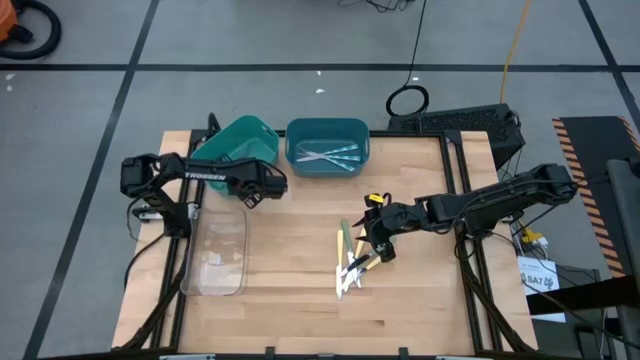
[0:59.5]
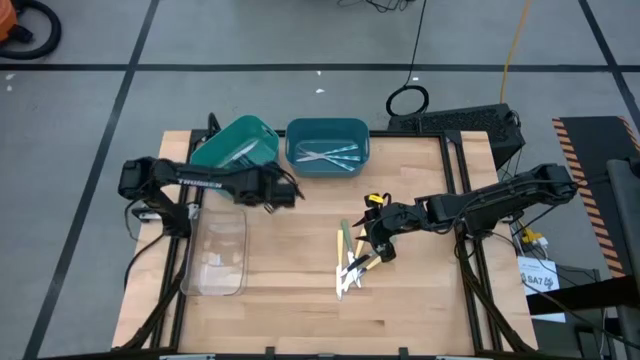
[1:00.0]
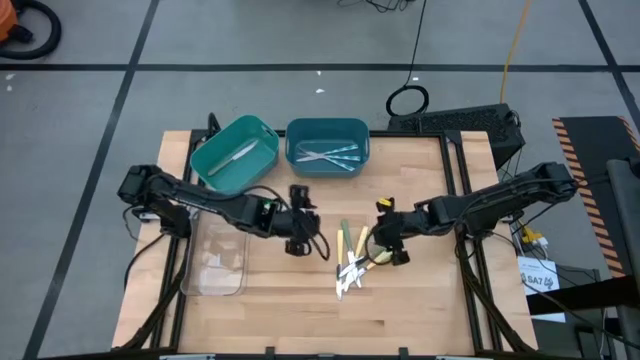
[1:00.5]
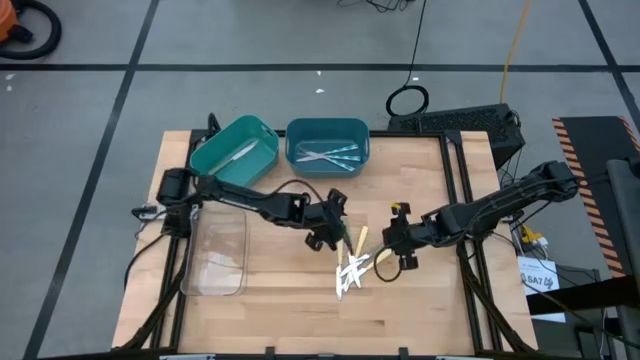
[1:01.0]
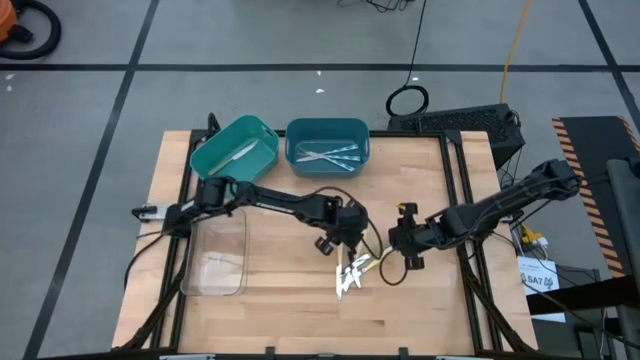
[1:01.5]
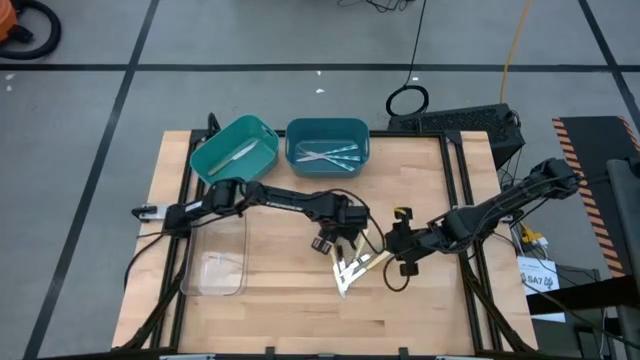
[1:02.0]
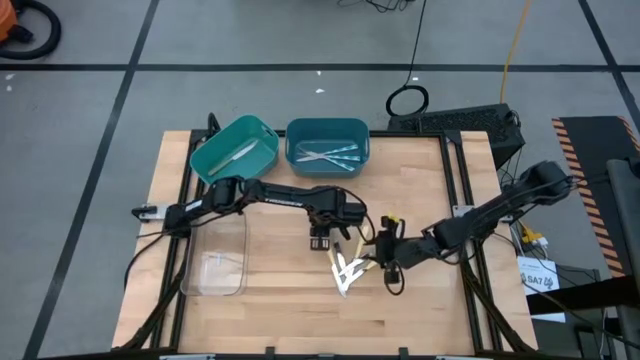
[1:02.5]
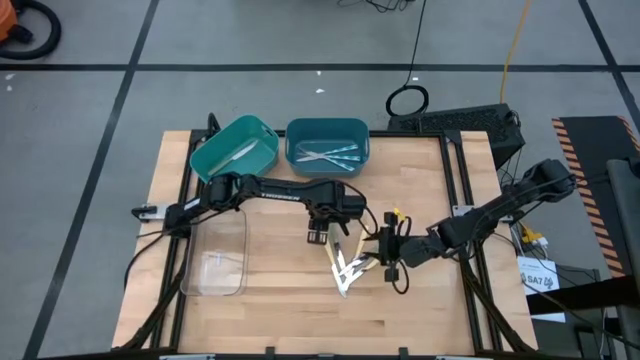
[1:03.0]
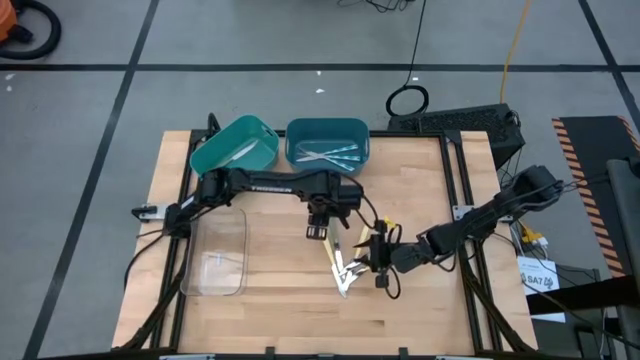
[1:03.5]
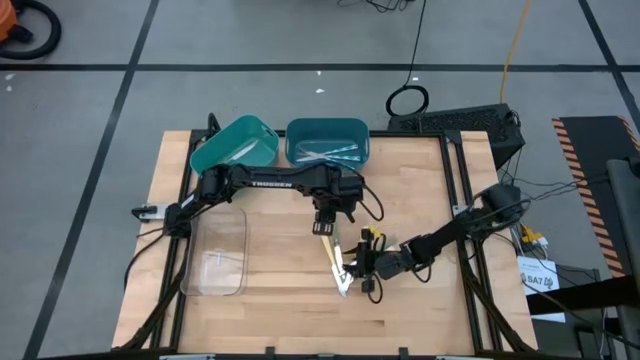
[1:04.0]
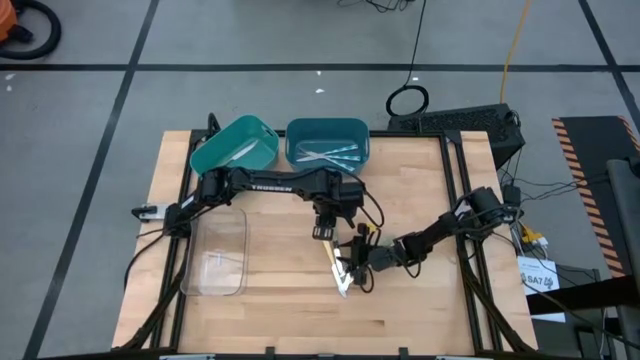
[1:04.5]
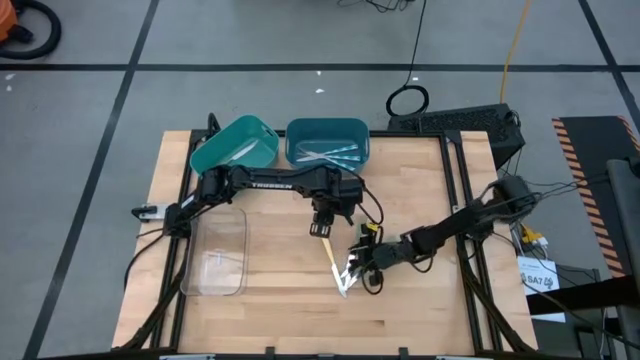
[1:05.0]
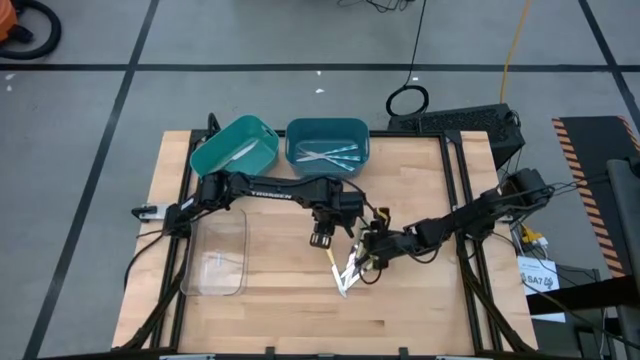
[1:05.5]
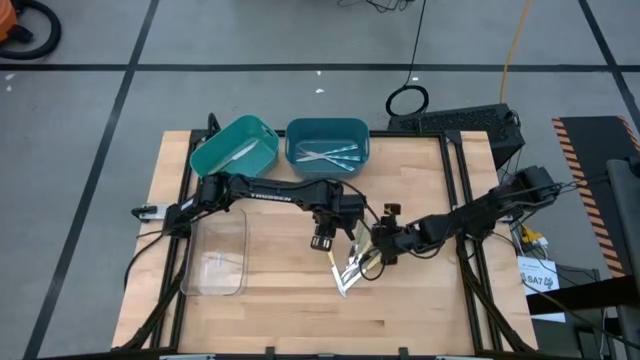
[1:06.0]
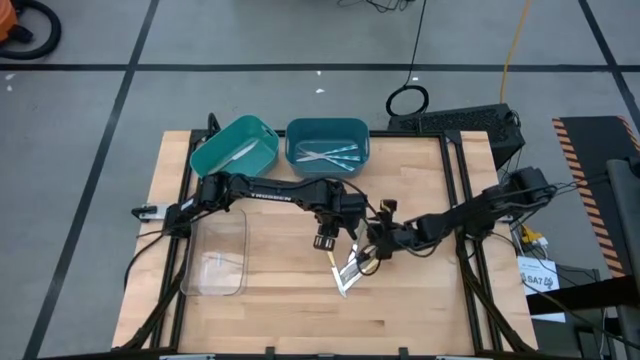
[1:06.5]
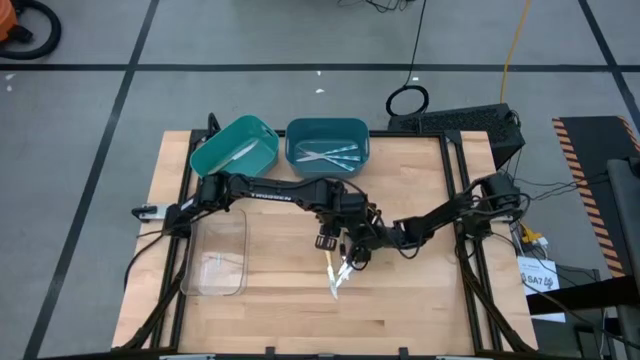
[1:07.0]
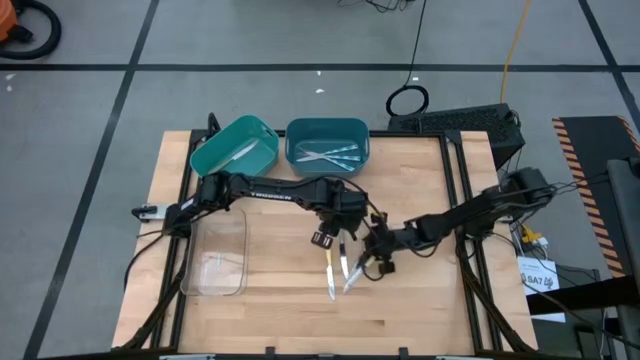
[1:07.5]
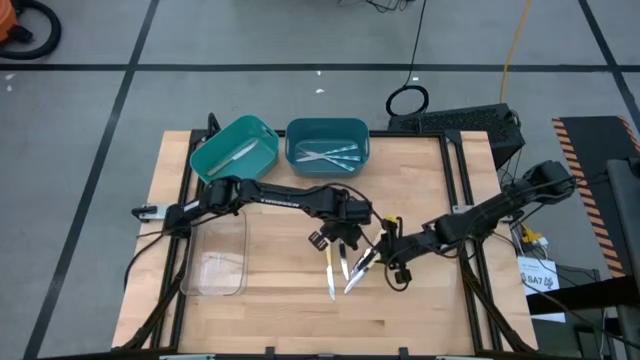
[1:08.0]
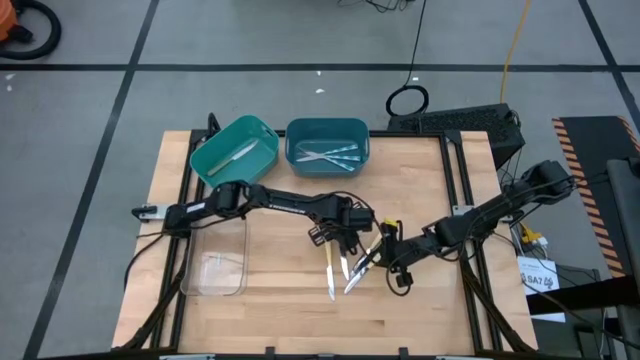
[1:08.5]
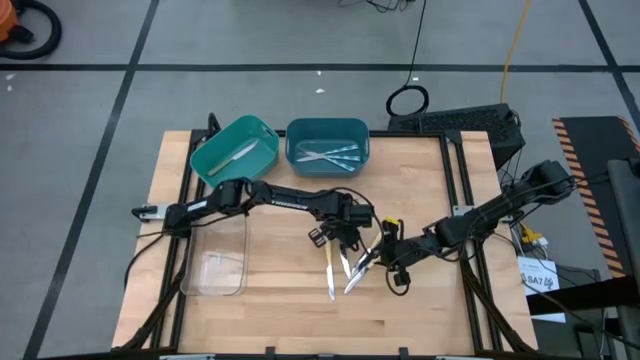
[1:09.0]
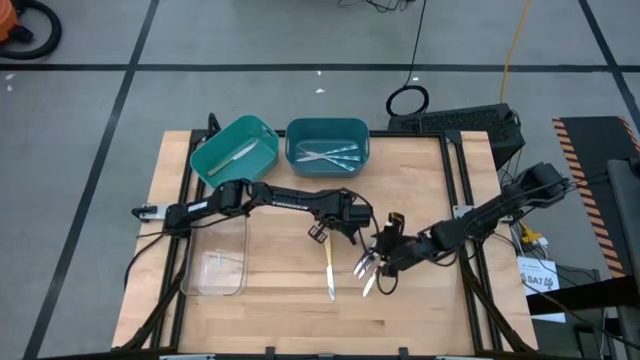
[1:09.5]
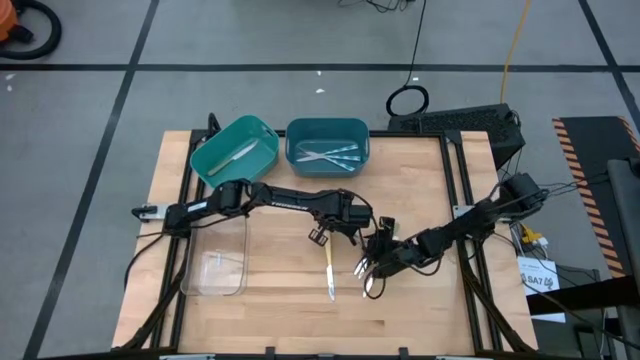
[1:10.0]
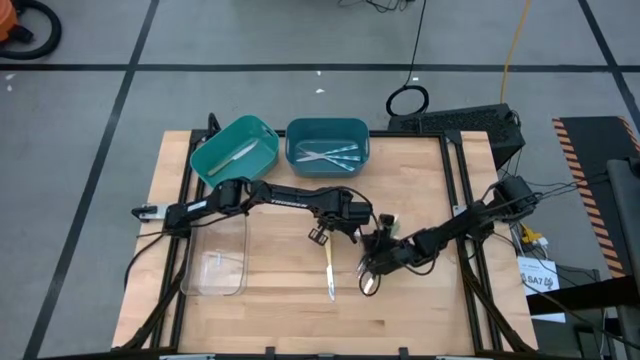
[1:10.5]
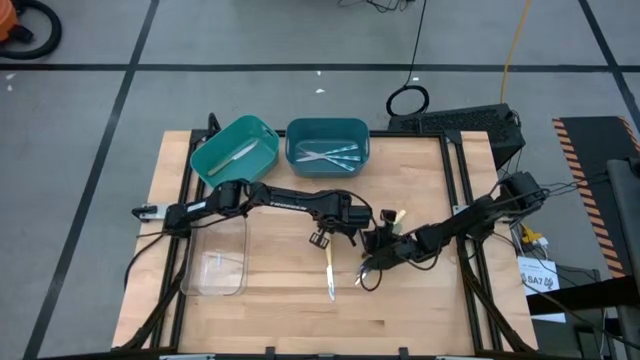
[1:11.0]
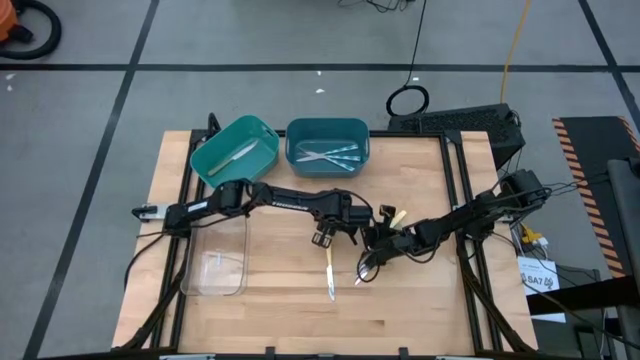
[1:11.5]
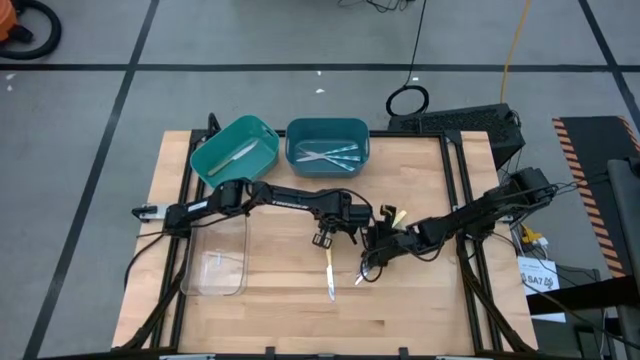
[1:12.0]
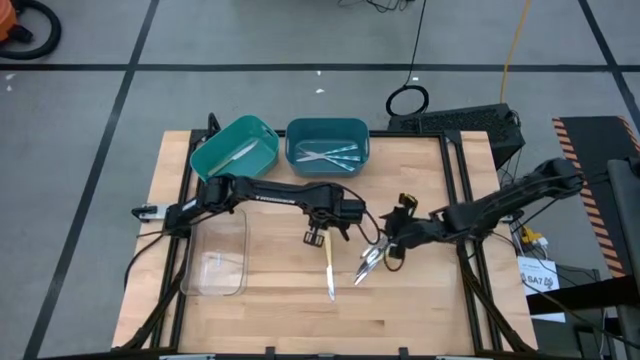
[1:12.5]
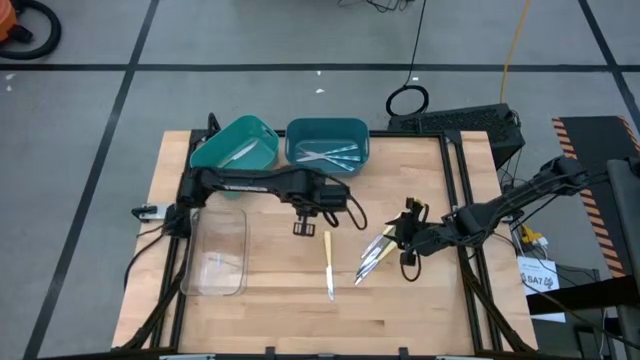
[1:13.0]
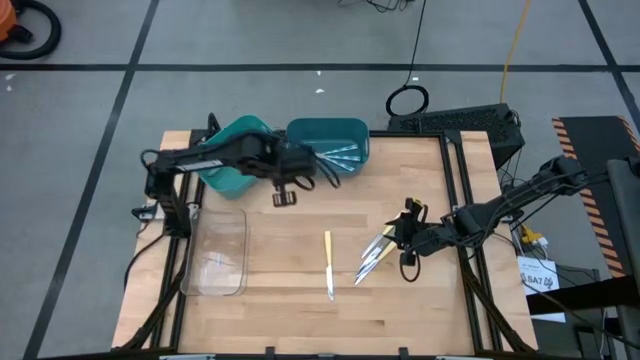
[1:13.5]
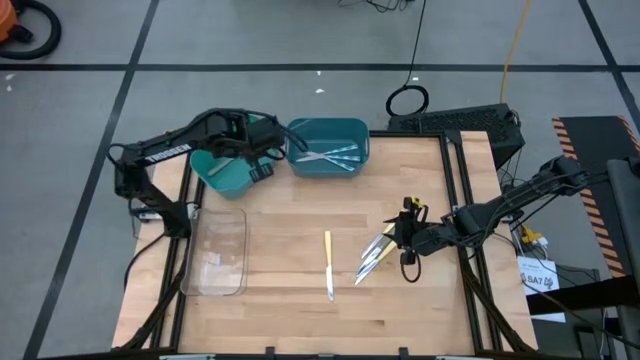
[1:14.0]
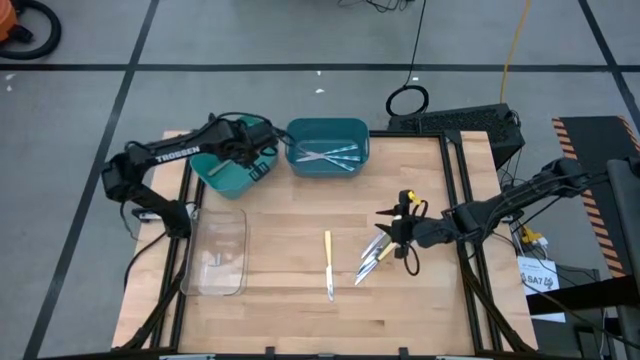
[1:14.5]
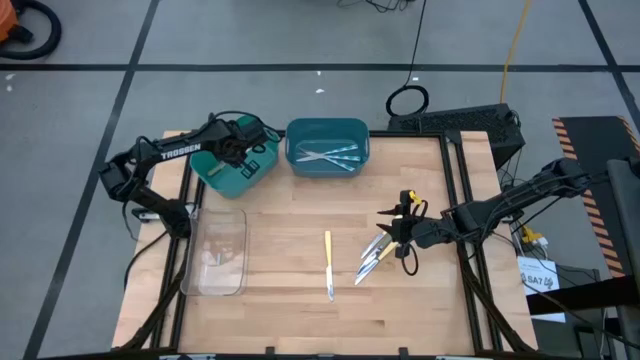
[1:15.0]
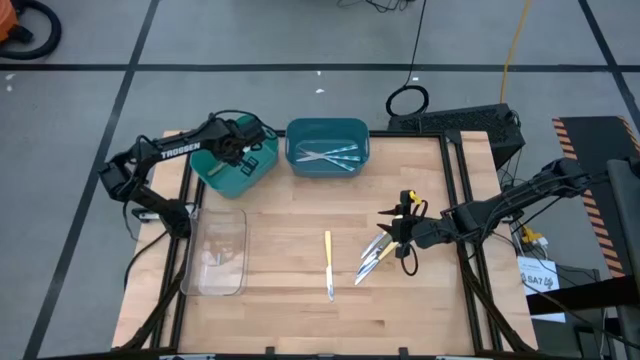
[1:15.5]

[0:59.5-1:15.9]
Task: Sort silverware by color (type)
Put the left green table knife into the green bin

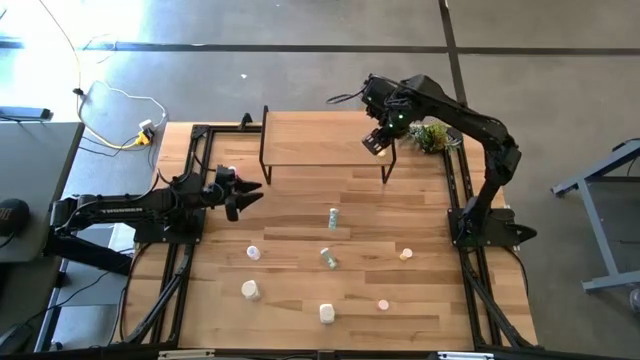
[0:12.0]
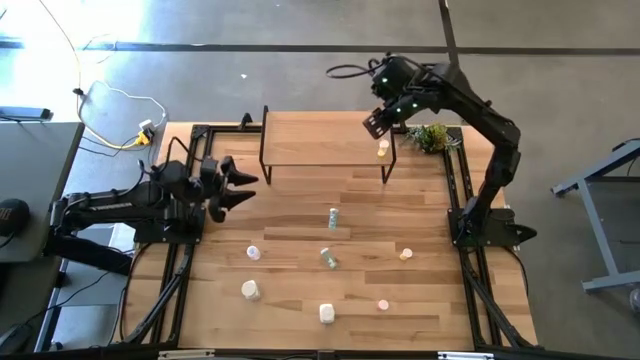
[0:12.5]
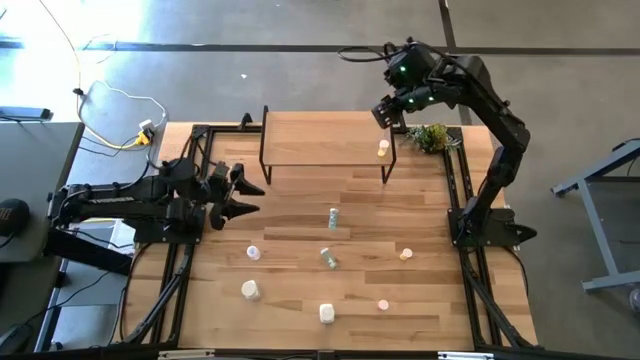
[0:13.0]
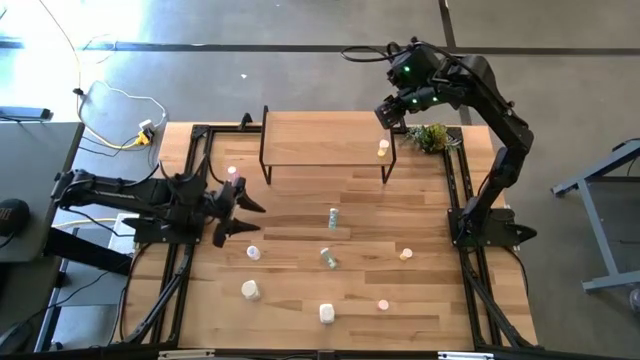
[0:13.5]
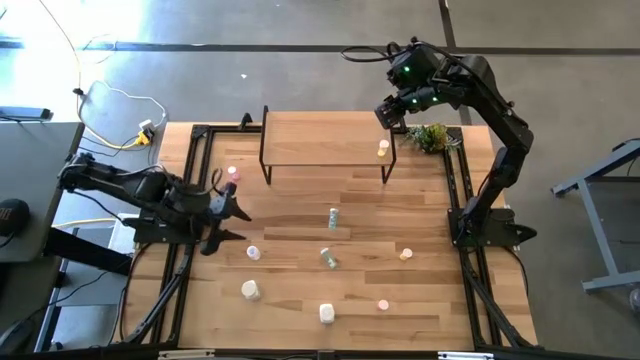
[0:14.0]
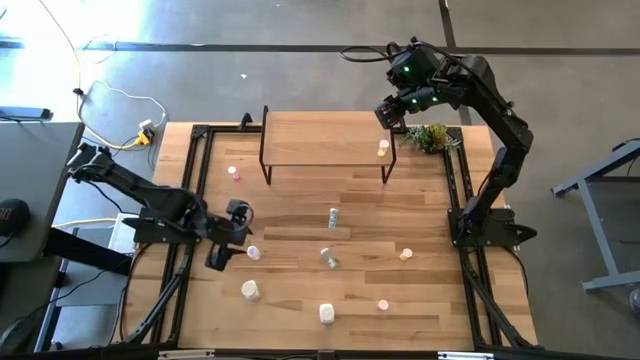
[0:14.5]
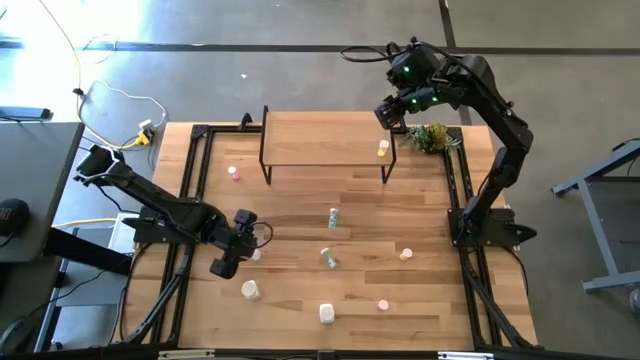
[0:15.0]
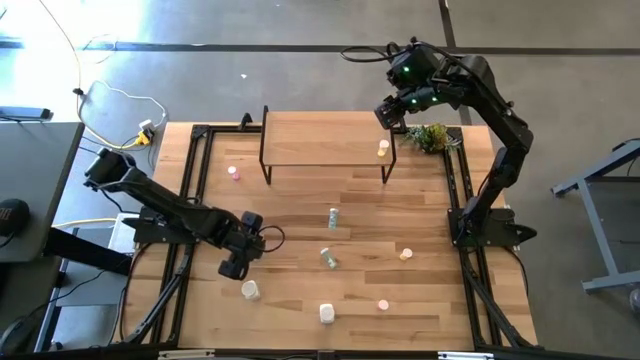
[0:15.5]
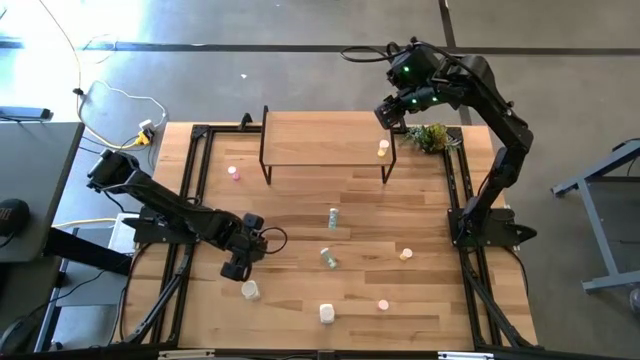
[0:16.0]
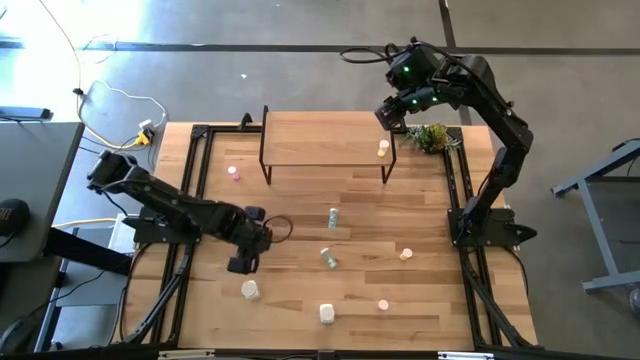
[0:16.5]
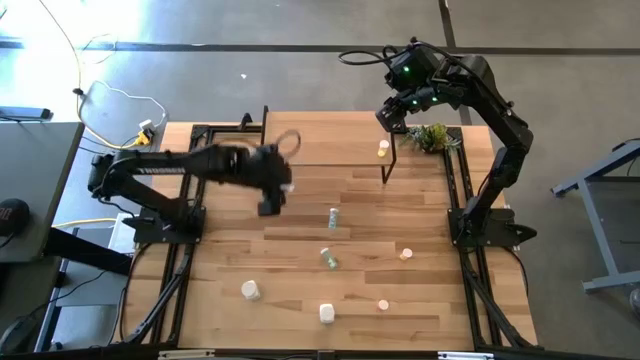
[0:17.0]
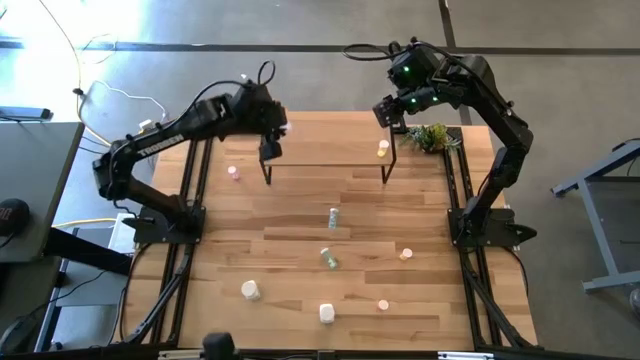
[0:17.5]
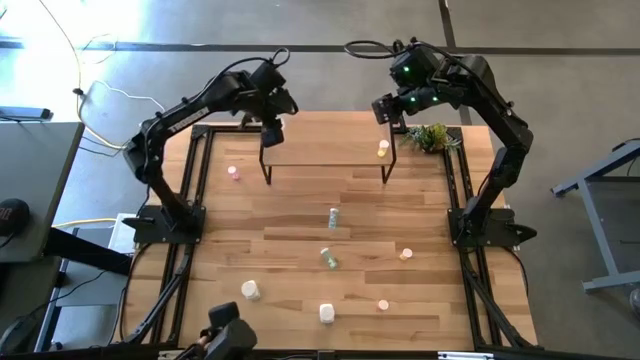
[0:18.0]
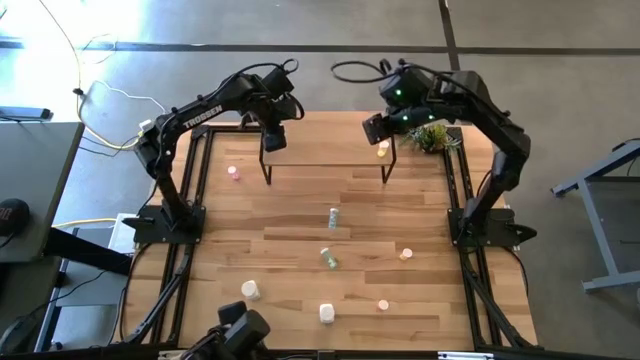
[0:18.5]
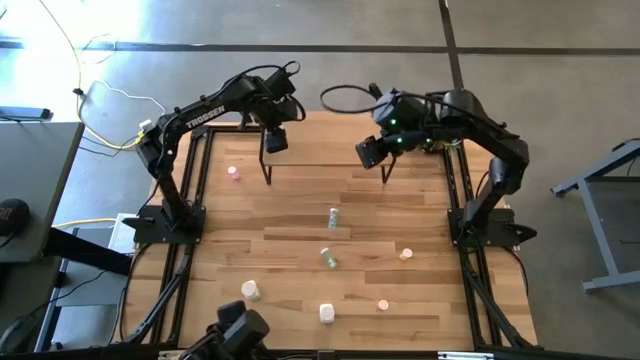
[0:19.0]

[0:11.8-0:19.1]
Task: Pick and place medicine bottles onto shelf by color
Put the transparent medicine bottle on the shelf
